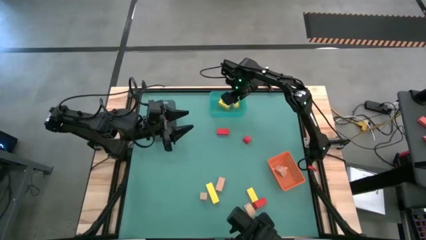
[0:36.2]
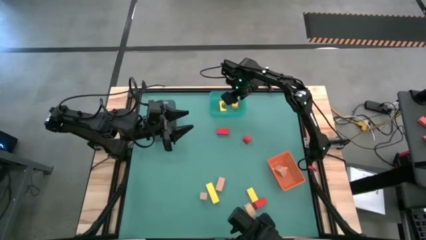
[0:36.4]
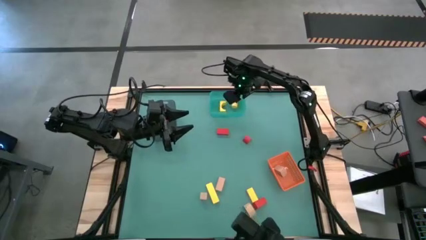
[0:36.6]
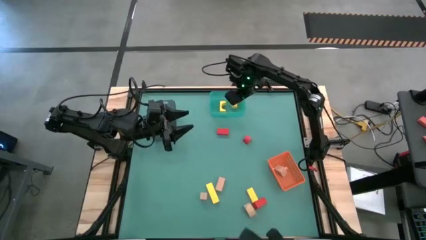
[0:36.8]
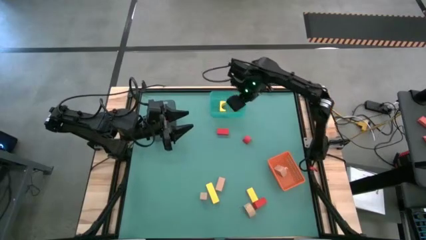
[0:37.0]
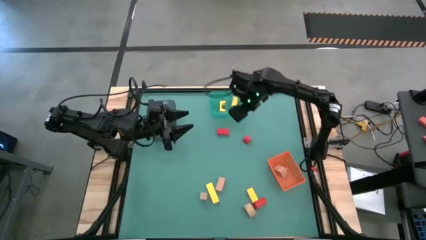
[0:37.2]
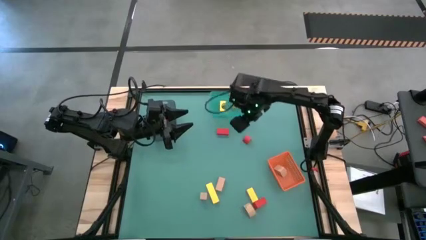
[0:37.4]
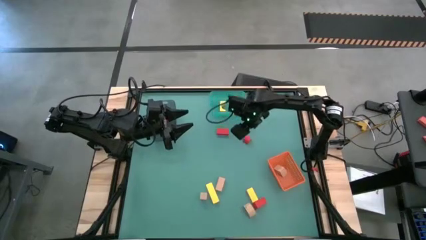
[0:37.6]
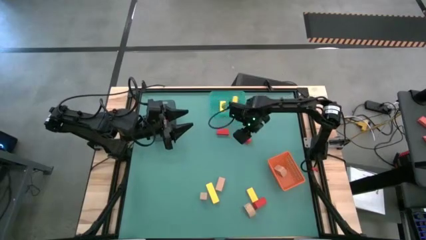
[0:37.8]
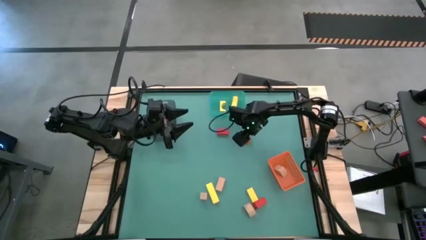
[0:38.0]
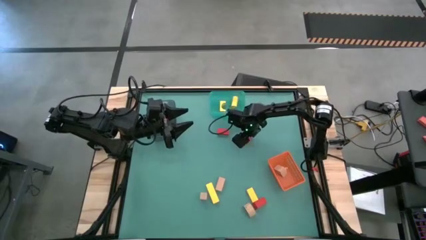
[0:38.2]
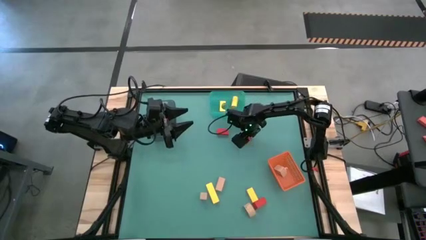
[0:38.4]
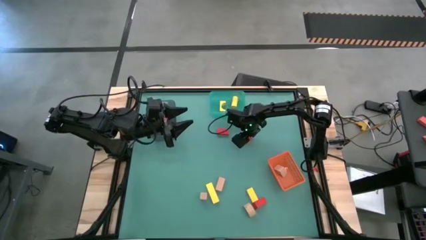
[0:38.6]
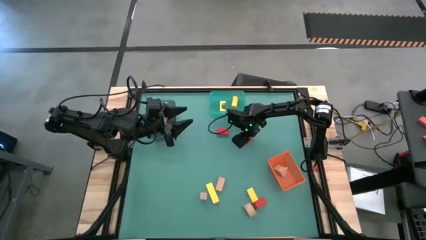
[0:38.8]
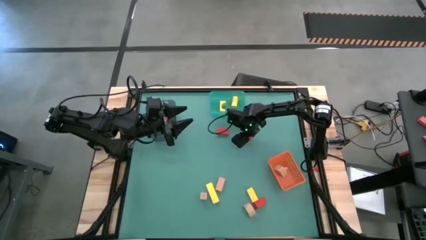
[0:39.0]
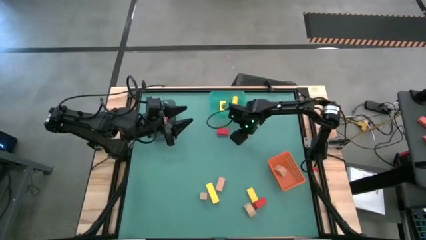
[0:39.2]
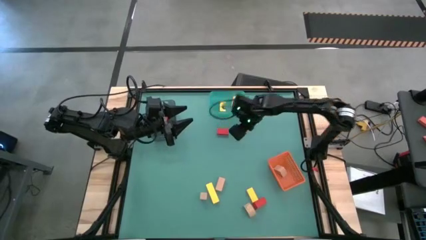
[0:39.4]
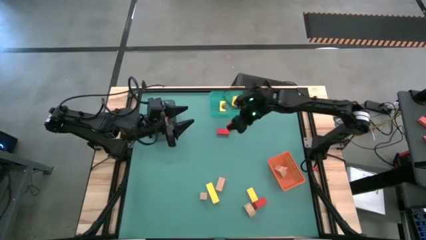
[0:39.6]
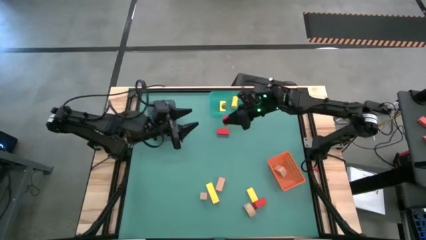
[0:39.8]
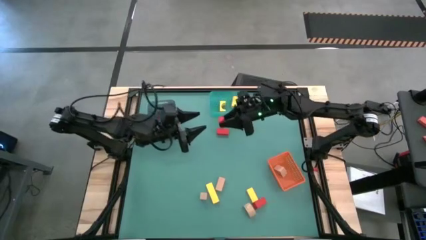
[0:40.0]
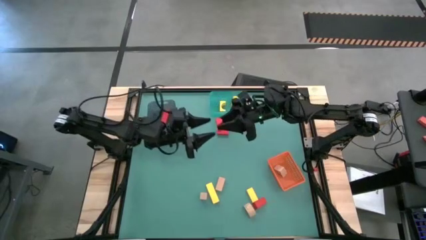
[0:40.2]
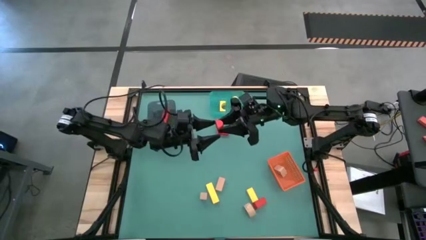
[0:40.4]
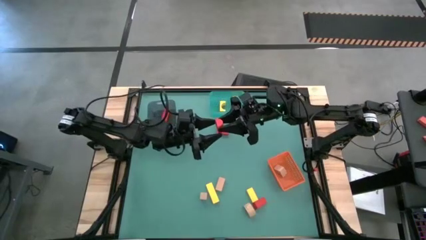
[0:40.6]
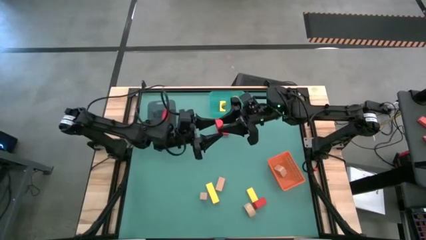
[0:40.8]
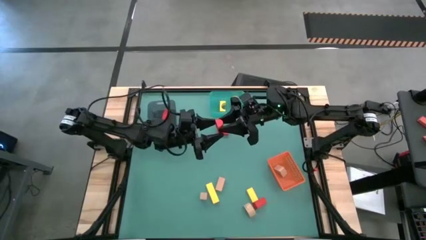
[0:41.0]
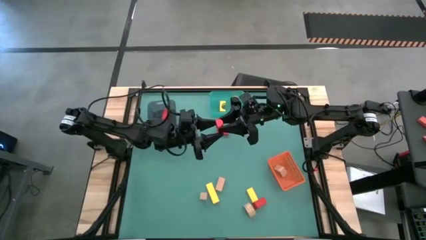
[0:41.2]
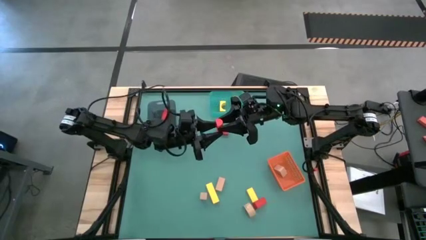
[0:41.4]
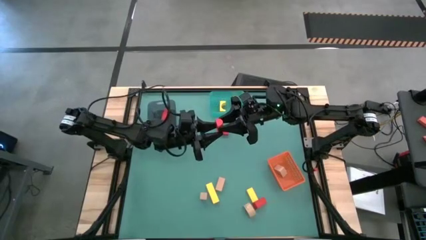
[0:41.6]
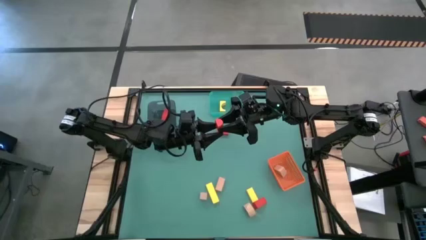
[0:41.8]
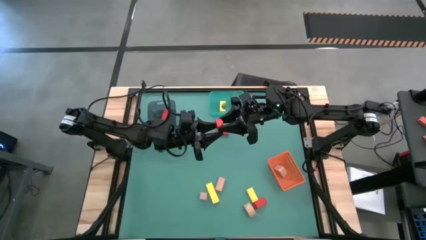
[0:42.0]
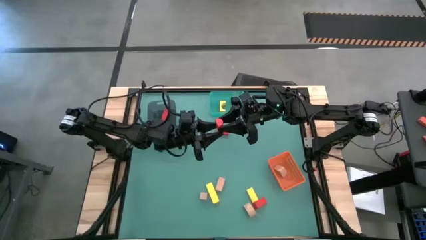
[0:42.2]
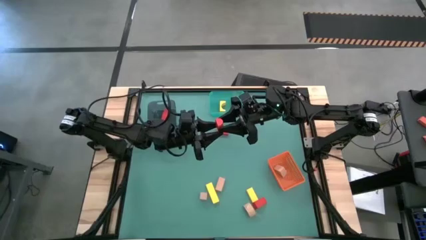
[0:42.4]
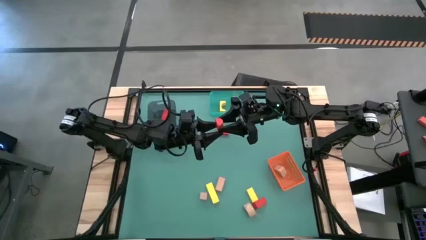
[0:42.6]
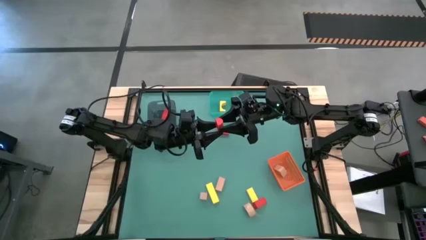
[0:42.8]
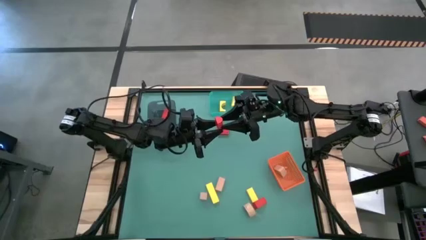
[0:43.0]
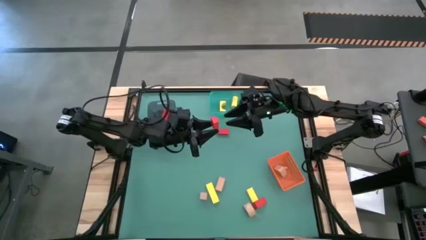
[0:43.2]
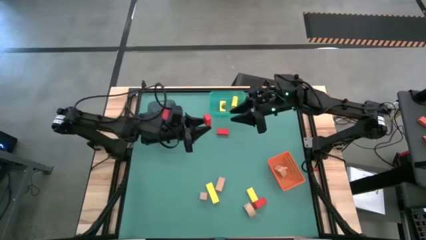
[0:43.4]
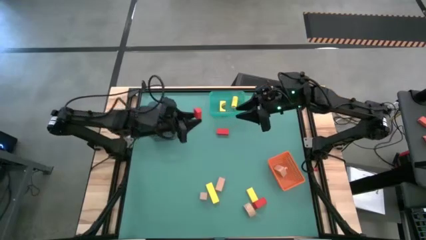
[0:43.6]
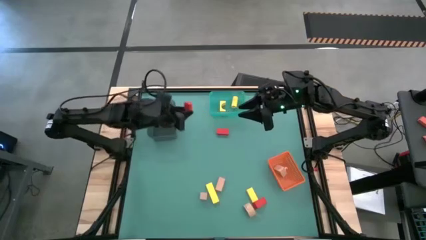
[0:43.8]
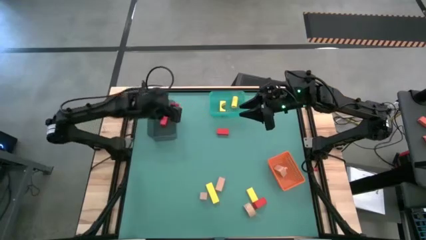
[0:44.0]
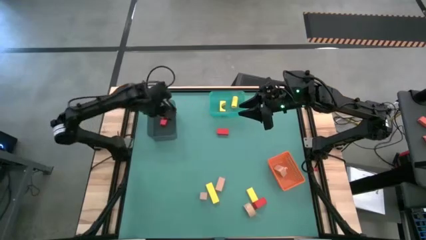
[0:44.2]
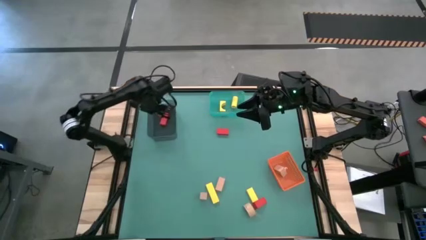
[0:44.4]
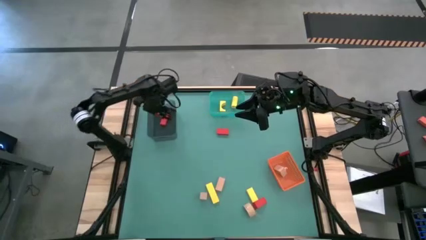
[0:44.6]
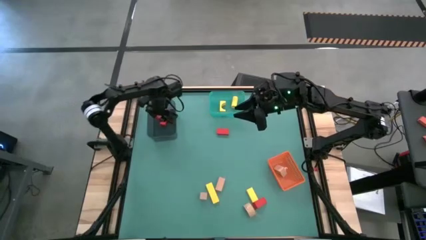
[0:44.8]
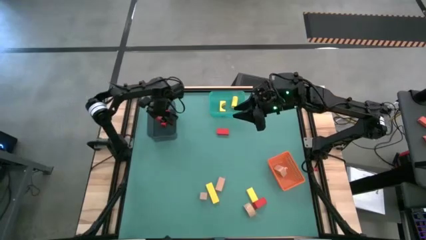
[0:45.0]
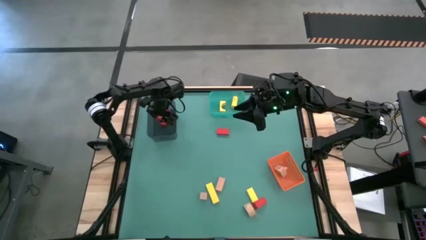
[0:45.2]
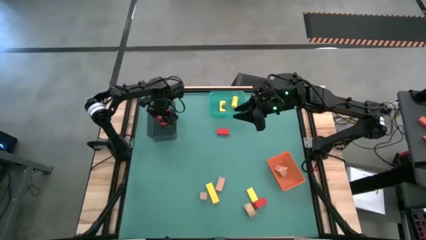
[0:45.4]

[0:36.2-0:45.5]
Task: Sort & place blocks by color
Put the red block into the black bin

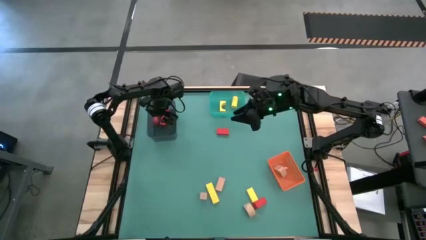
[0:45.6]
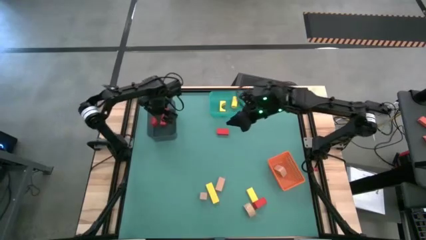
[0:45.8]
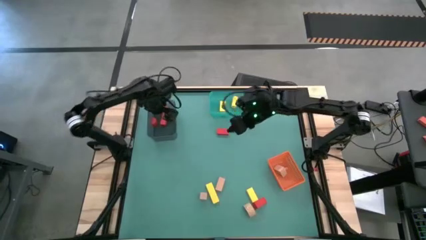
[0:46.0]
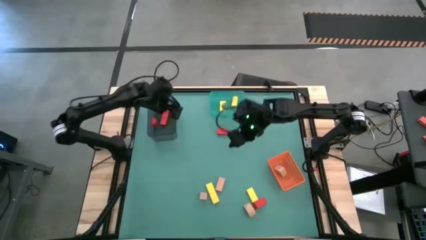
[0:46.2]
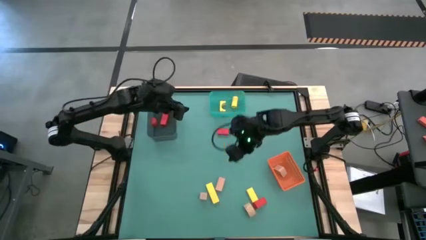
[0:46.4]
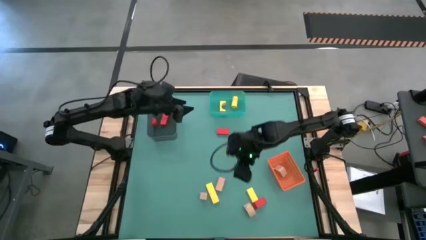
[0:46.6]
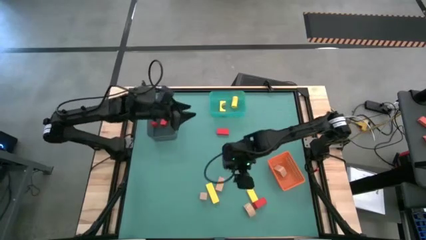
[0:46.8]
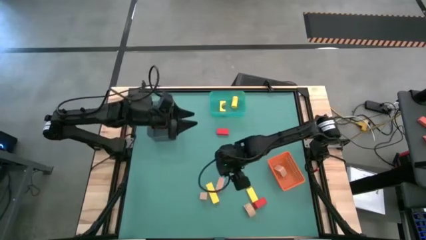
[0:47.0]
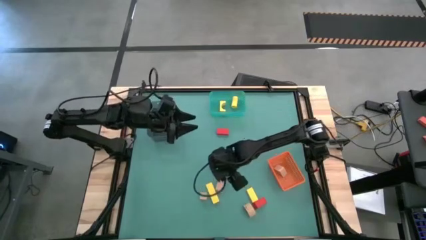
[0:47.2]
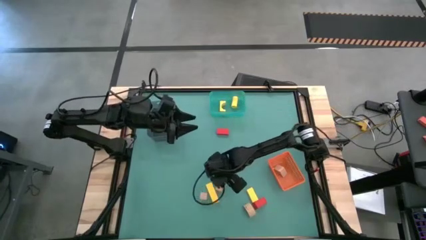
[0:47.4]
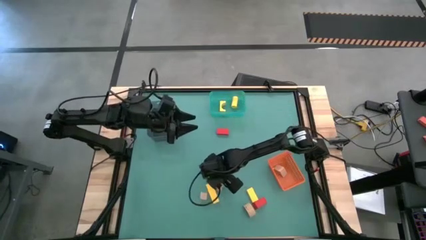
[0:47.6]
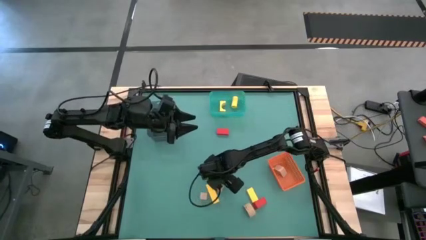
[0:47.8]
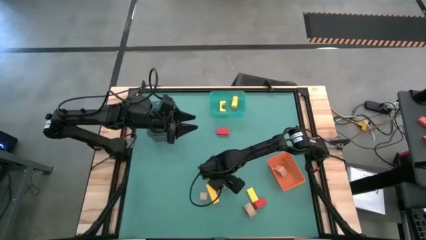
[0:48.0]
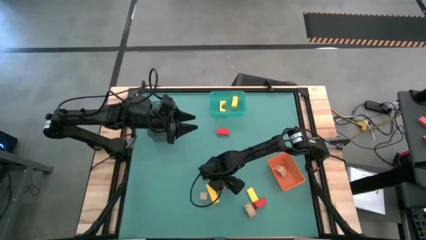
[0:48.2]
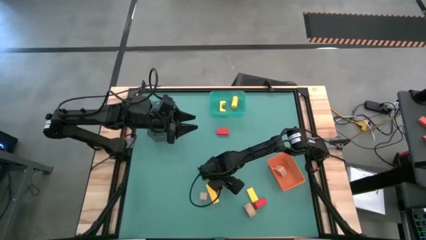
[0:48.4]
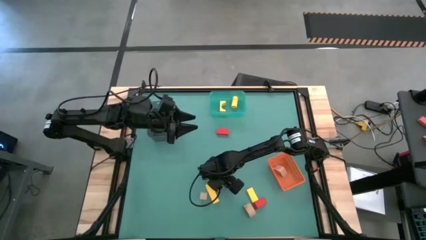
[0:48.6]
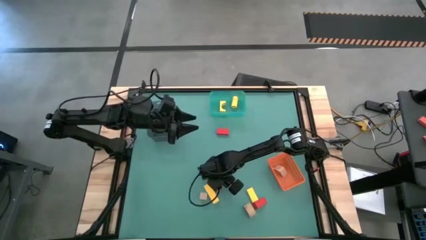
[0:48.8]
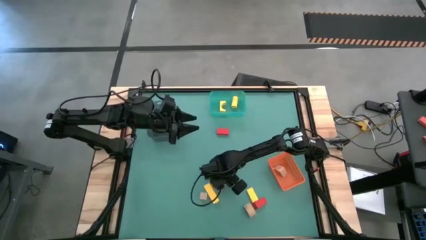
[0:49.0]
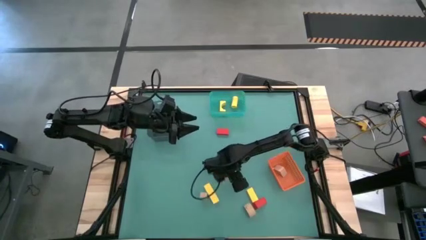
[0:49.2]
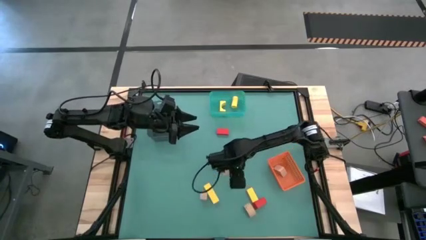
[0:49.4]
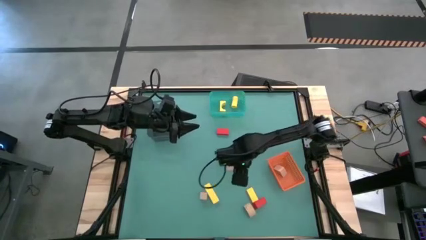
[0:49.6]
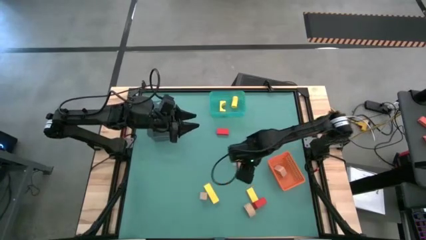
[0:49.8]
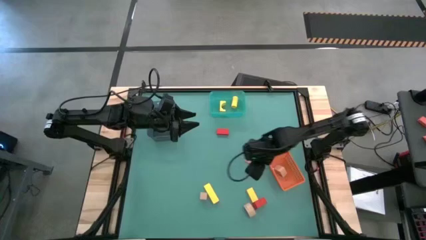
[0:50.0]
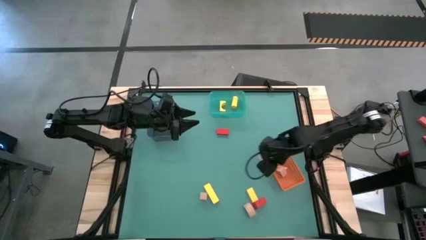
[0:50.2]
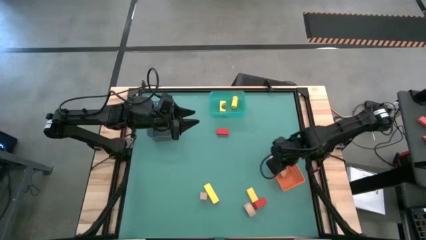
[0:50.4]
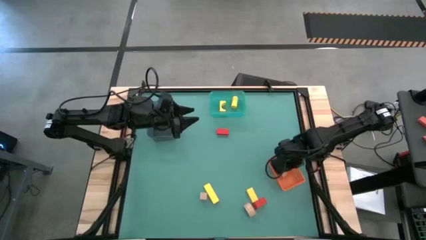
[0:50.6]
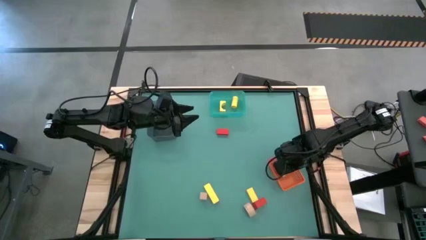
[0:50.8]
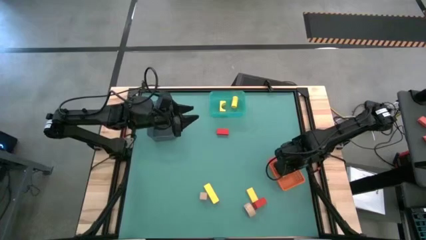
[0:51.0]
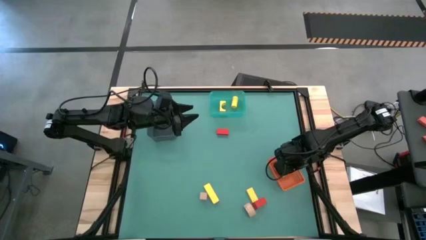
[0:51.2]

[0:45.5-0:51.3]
Put the light brown block into the orange bin
